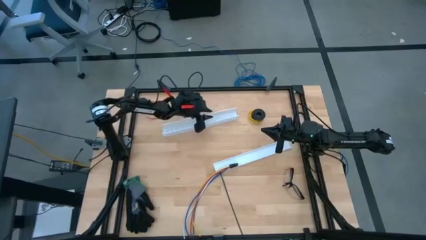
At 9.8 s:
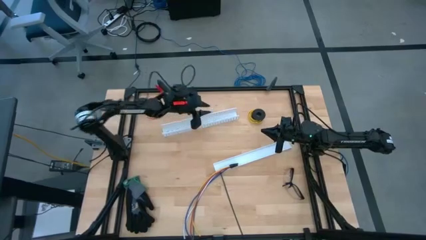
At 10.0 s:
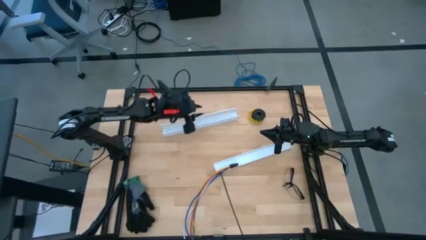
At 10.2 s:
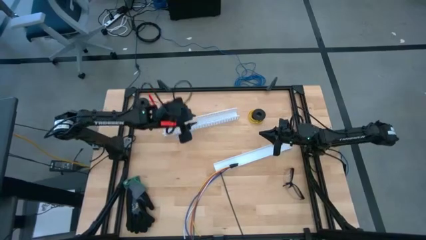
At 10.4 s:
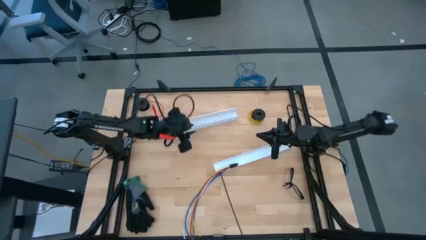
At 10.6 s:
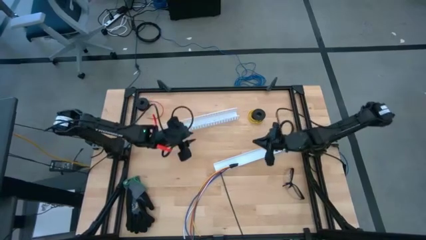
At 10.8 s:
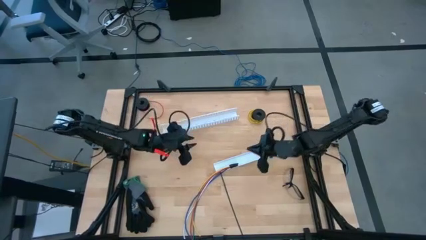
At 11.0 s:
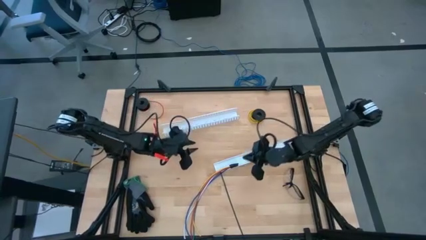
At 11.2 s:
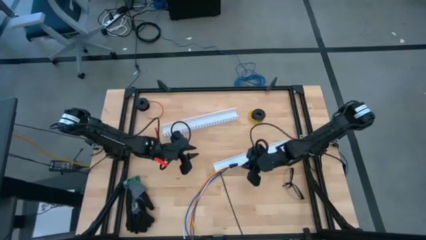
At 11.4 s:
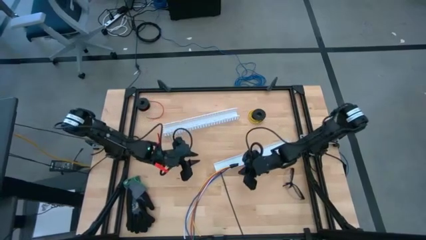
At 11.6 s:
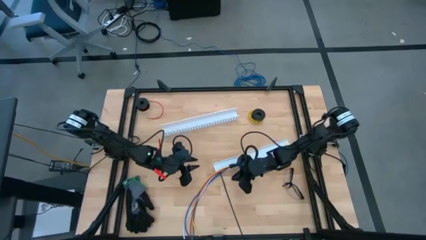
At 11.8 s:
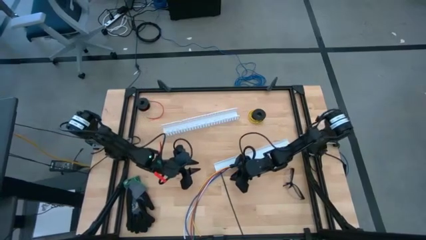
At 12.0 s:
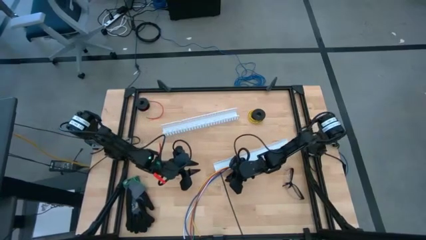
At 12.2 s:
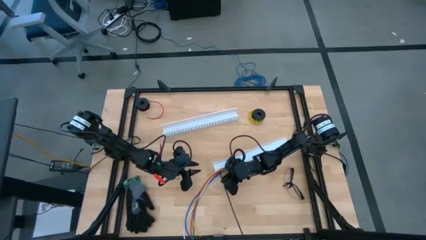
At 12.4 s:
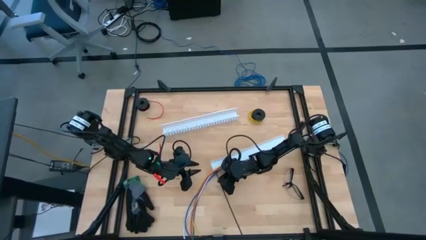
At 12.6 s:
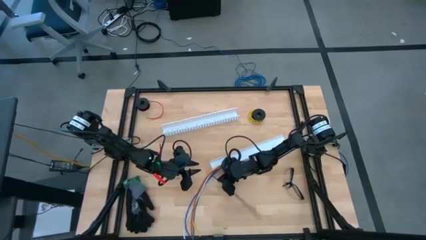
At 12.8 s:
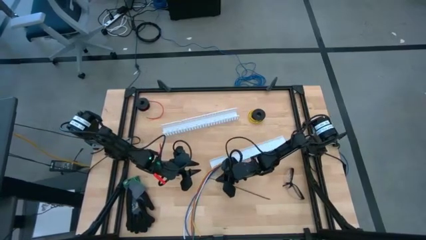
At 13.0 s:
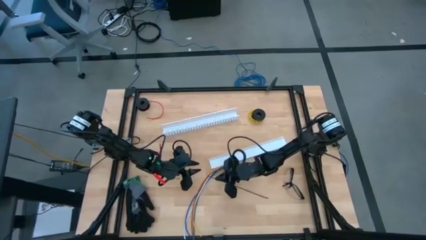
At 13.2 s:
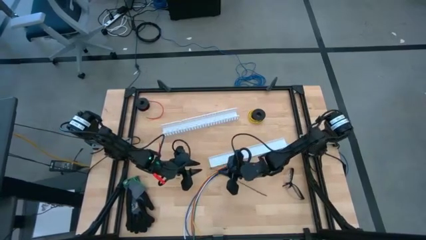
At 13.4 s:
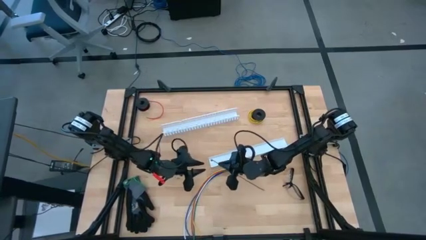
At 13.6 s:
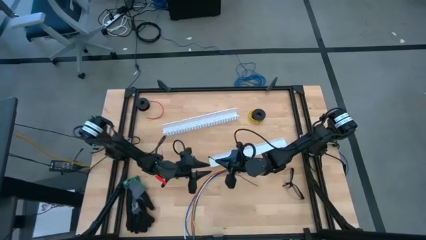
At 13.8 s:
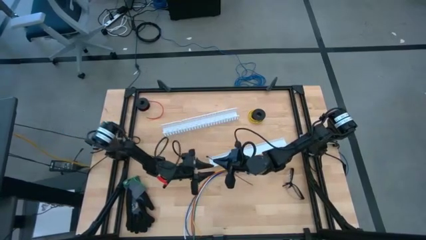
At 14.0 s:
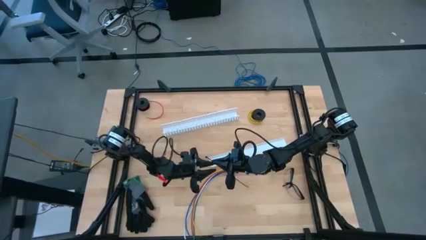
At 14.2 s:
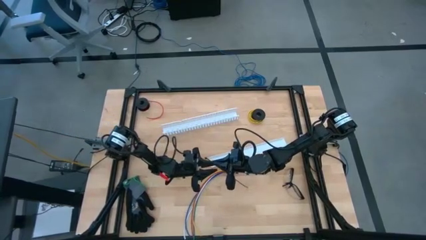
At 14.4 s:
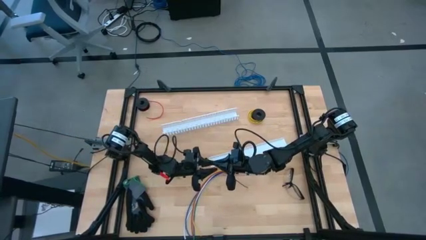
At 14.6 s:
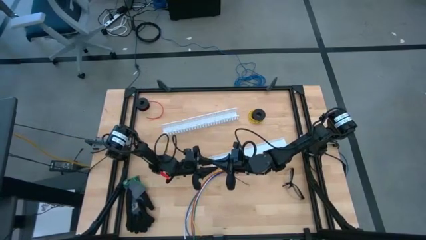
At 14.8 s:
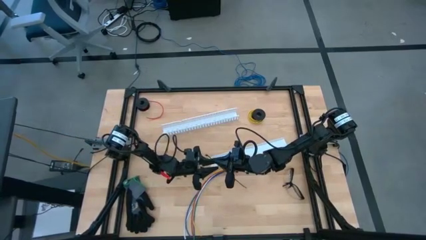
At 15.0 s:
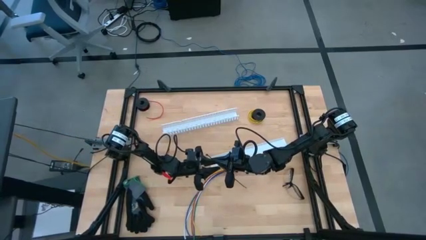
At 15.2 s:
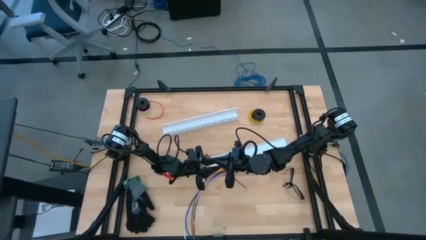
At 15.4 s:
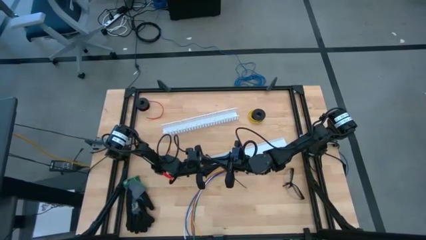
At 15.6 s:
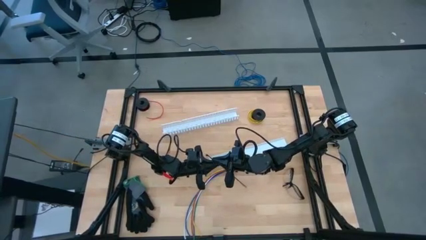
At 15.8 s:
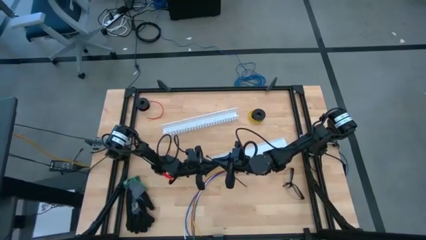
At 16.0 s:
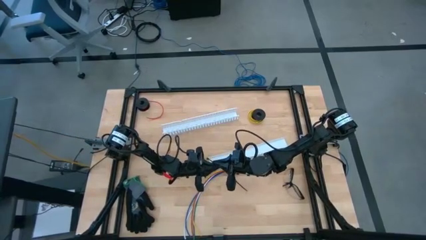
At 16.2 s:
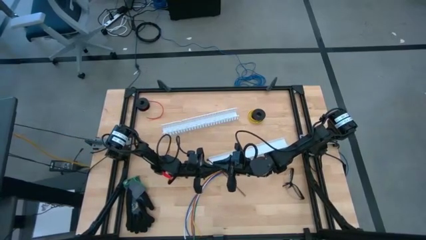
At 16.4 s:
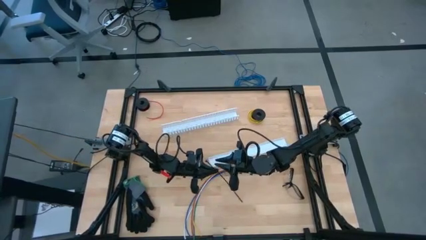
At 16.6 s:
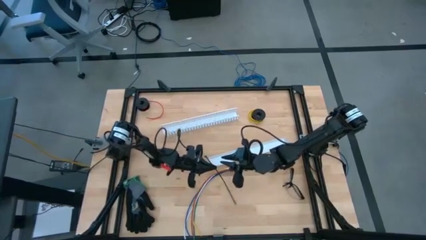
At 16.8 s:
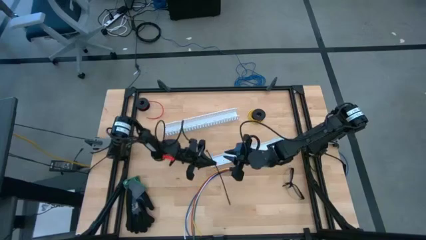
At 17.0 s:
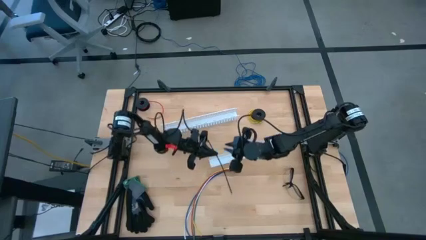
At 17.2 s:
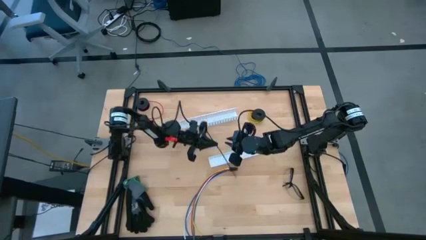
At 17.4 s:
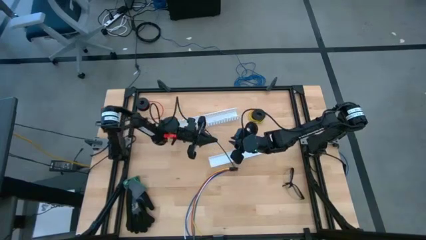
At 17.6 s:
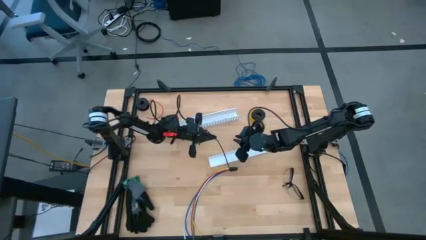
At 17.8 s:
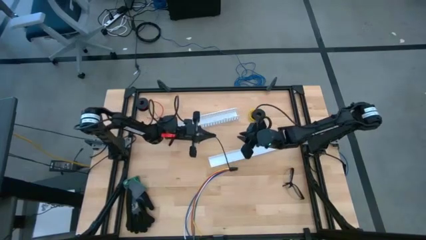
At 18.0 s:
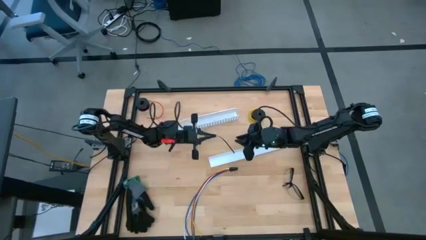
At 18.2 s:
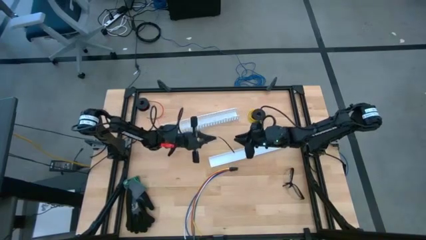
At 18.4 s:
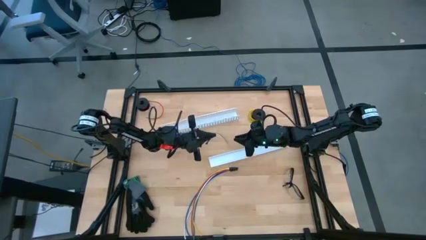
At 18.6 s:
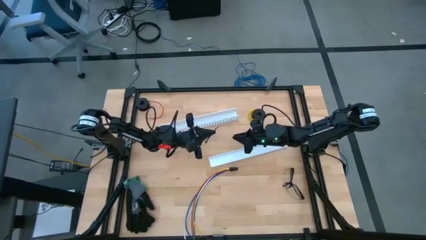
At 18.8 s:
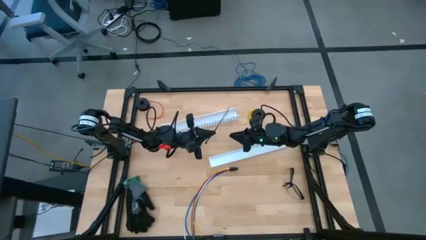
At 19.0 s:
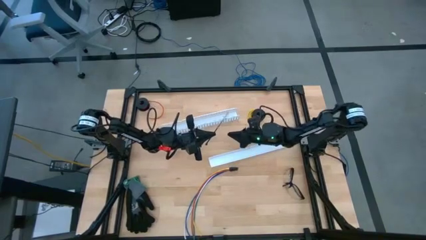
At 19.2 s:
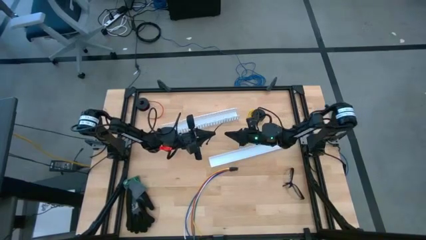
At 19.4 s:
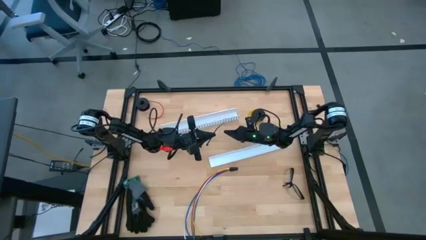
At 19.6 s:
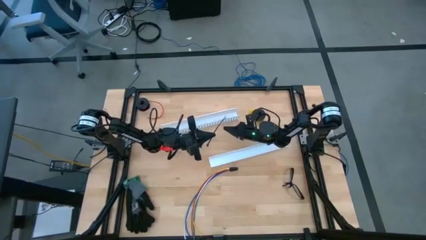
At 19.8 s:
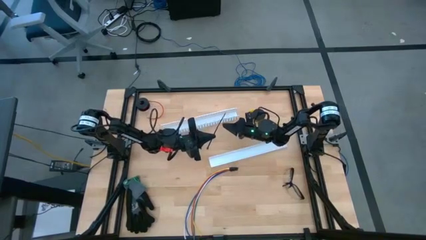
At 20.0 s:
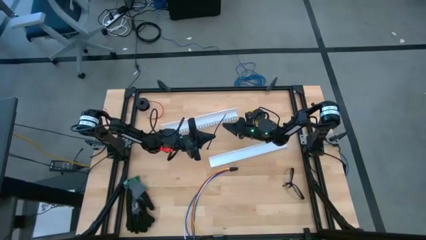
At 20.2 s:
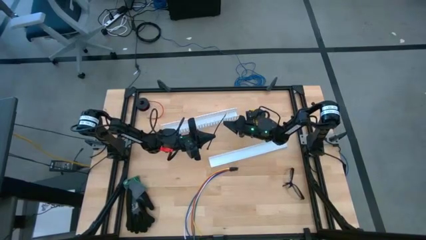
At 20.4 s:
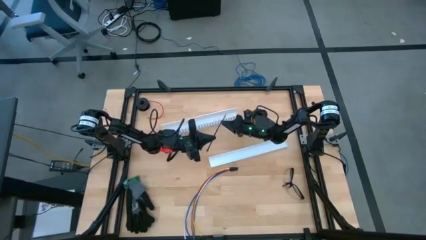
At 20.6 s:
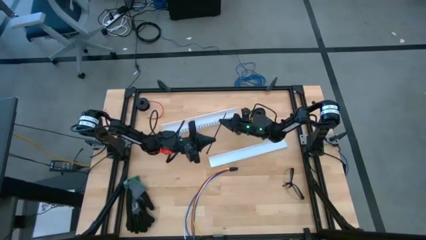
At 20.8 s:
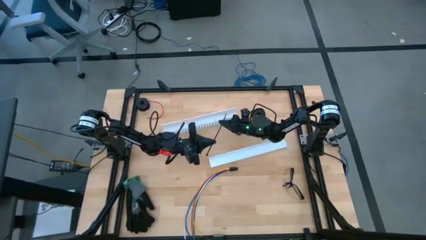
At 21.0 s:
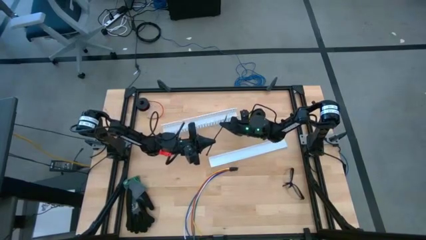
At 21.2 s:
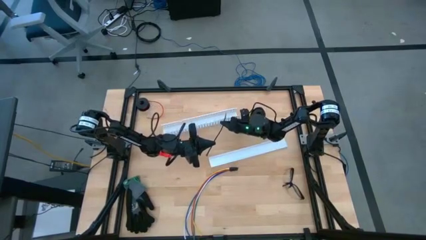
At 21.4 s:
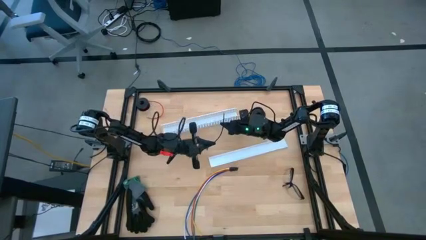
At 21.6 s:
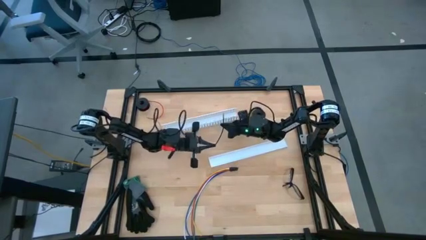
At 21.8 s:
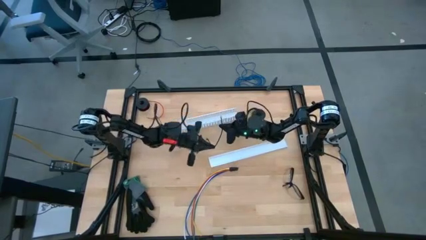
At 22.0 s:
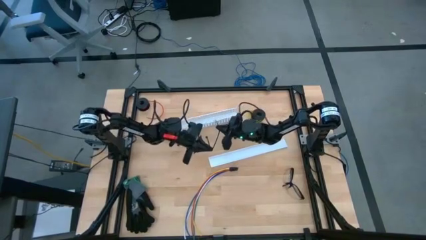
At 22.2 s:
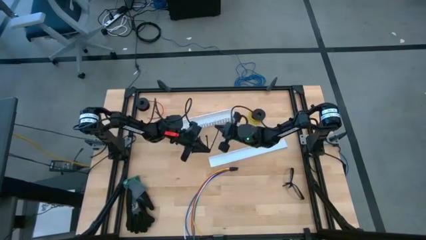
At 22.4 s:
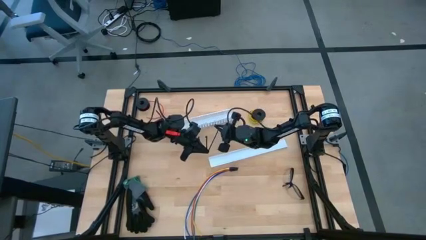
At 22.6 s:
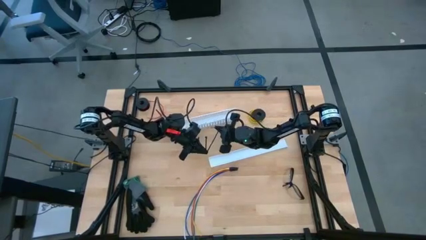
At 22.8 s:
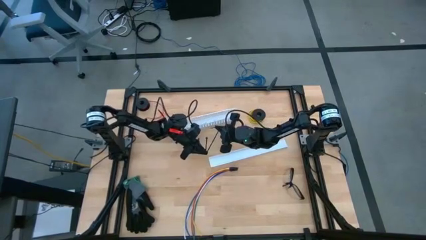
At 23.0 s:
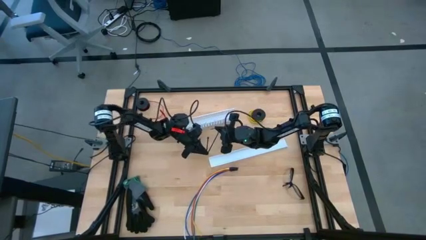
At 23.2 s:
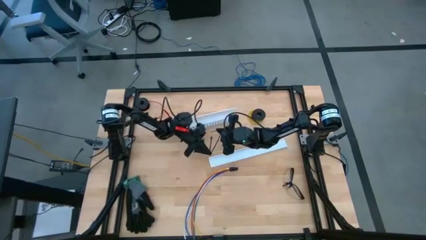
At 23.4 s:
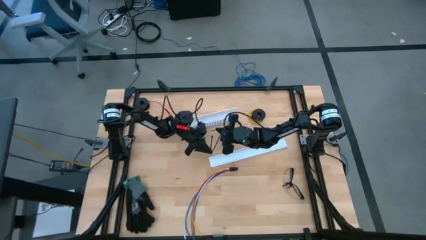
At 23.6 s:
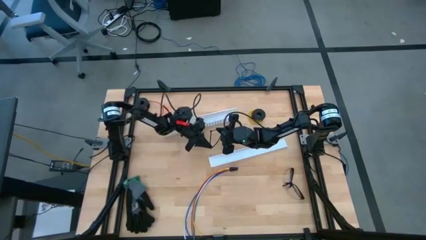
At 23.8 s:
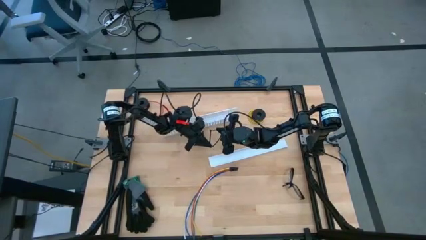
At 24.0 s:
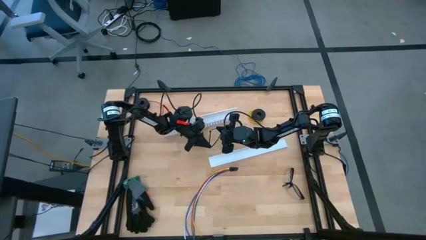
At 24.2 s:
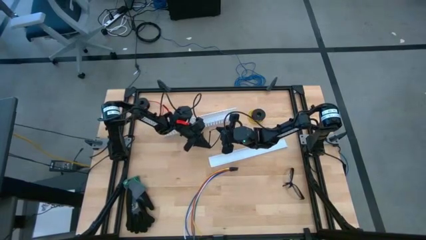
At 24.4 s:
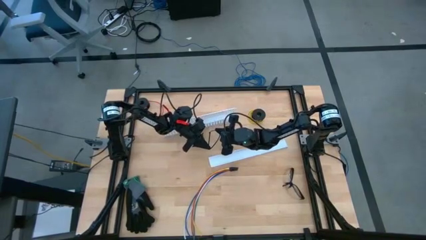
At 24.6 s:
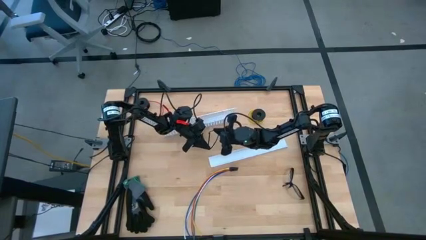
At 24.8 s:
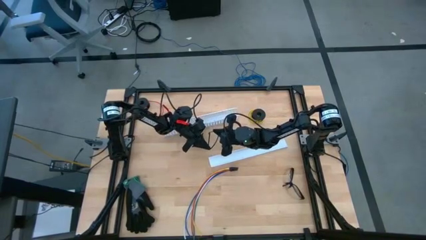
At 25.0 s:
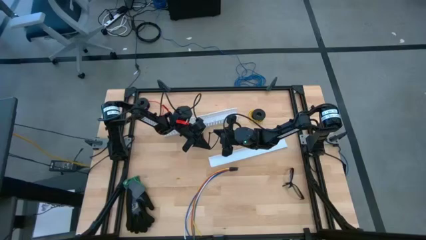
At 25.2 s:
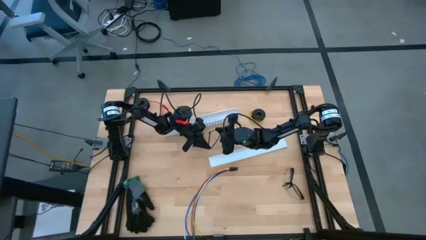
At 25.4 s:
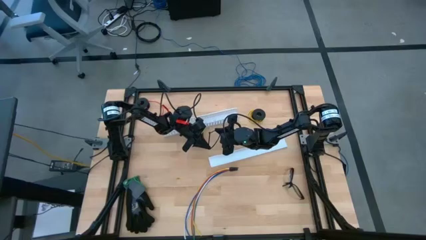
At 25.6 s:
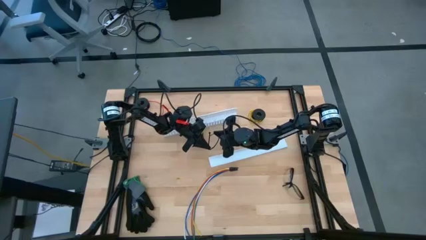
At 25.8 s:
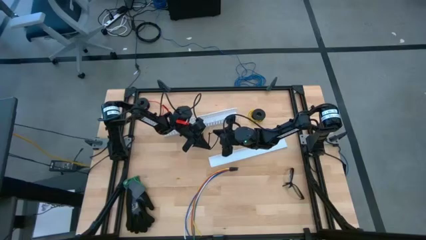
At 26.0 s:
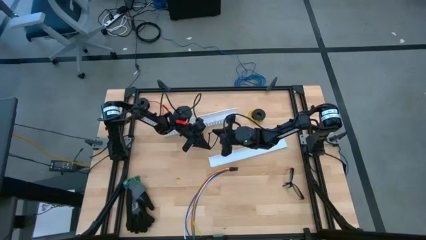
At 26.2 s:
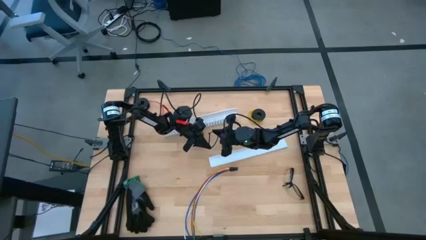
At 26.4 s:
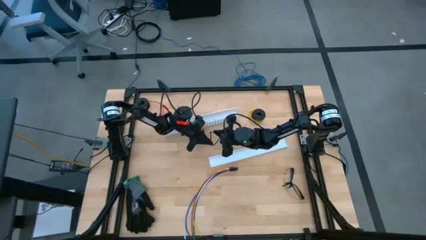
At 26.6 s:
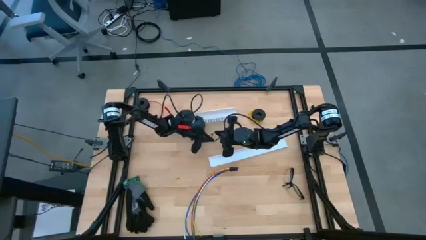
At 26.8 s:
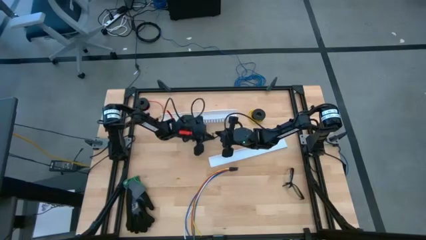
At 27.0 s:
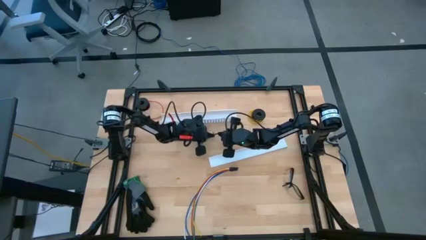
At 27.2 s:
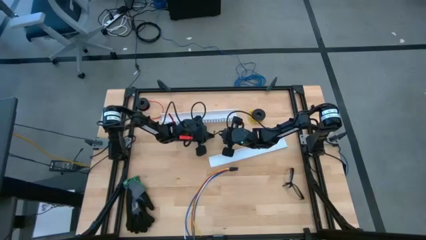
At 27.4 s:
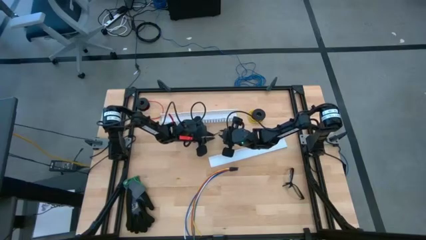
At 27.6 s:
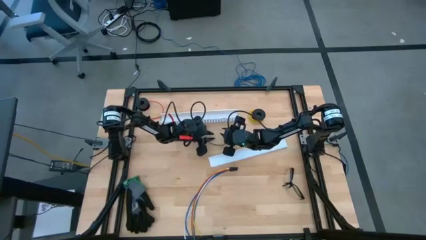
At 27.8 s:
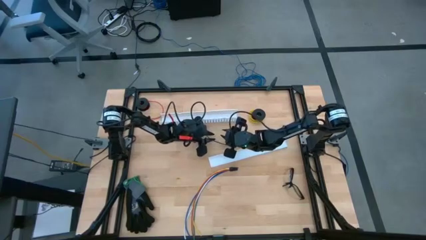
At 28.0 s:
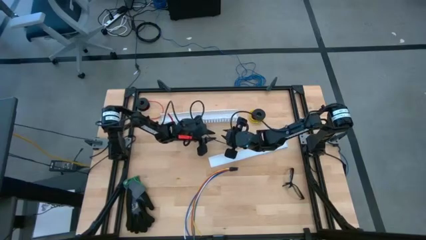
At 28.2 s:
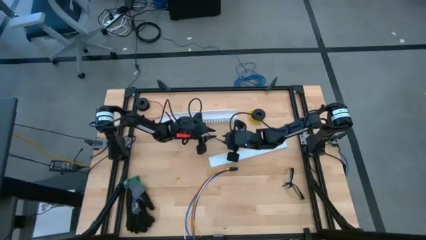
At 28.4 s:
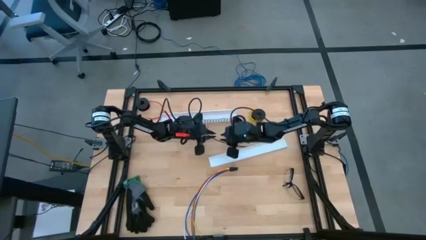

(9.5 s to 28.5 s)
Task: Ziptie cables
Wrap the cables together using the black zip tie
